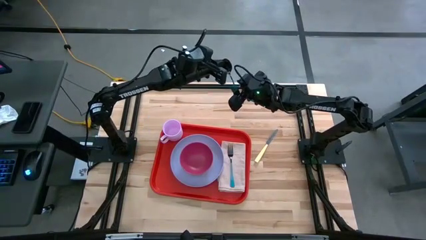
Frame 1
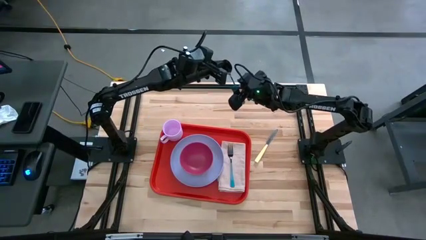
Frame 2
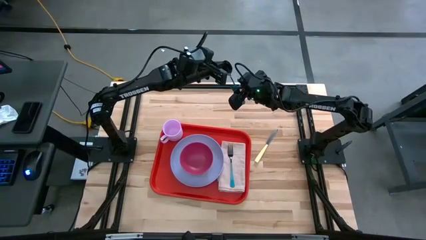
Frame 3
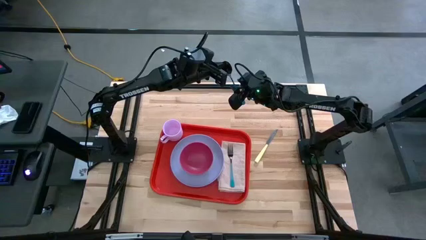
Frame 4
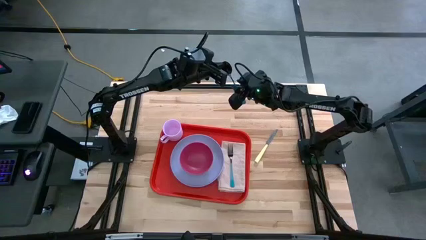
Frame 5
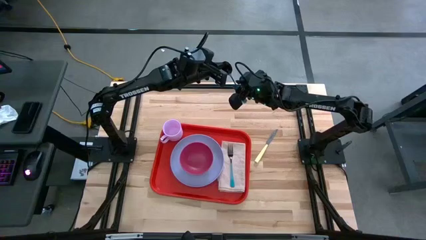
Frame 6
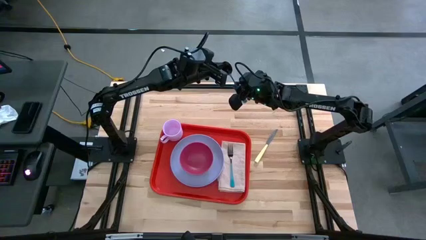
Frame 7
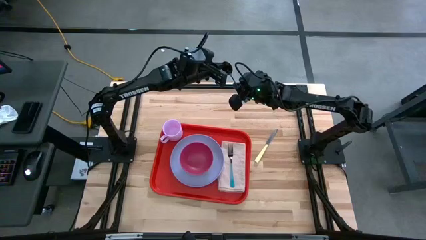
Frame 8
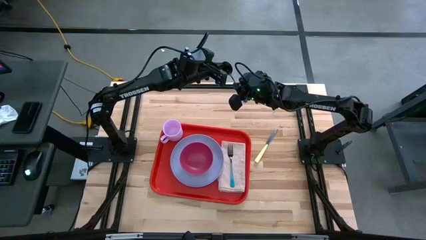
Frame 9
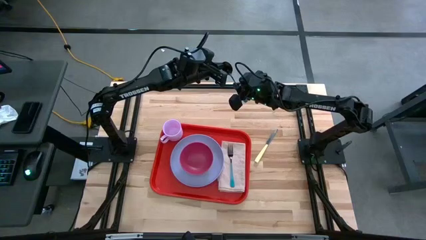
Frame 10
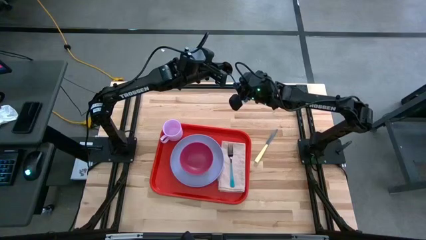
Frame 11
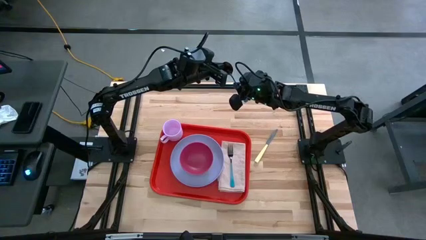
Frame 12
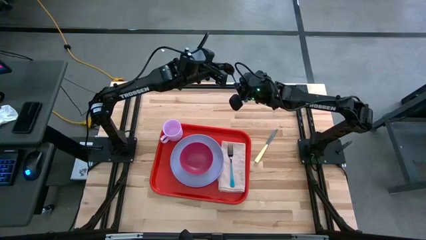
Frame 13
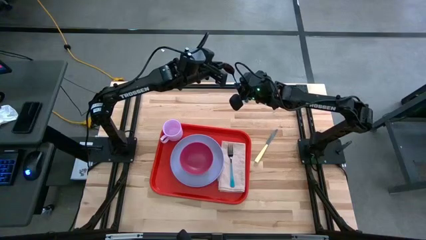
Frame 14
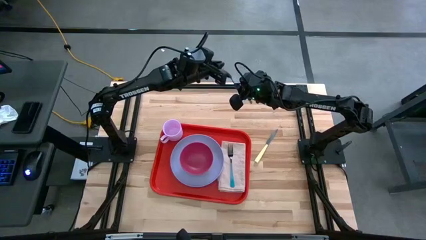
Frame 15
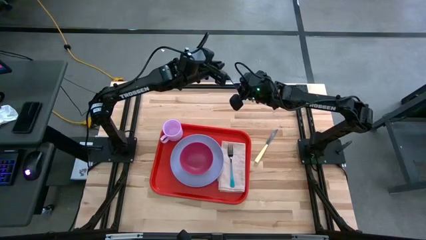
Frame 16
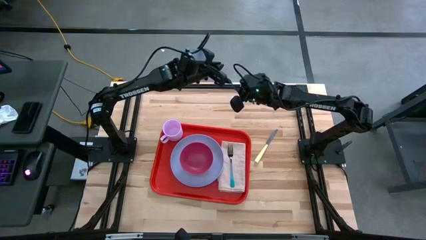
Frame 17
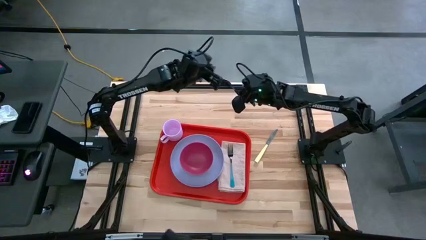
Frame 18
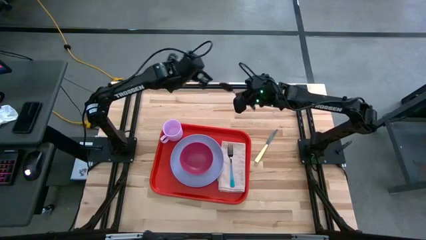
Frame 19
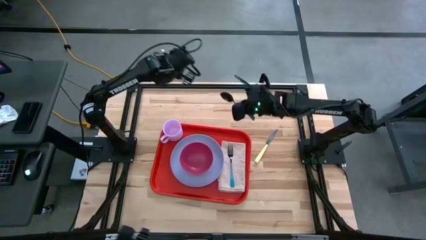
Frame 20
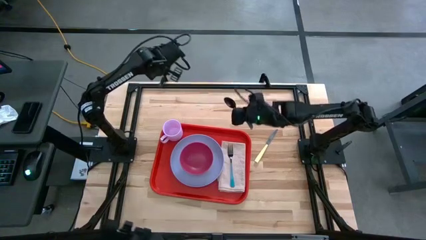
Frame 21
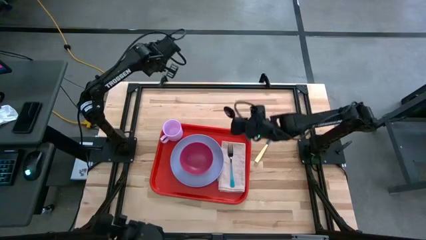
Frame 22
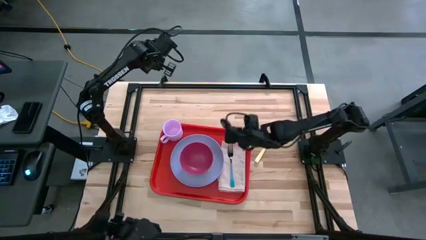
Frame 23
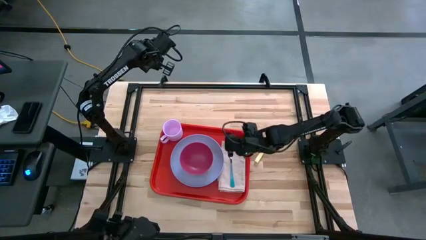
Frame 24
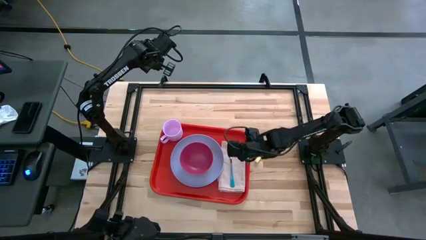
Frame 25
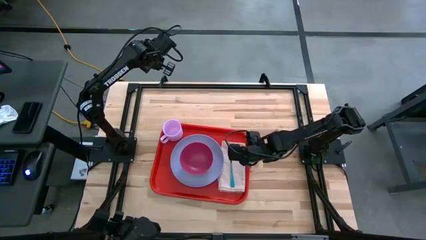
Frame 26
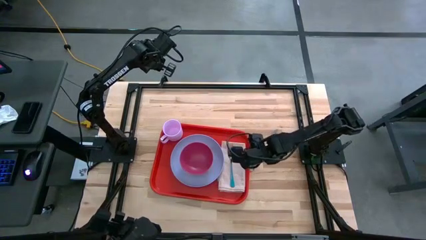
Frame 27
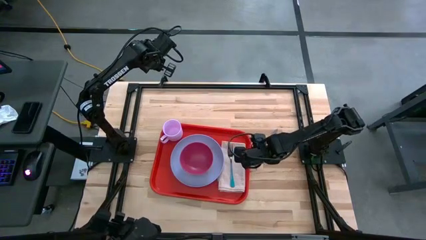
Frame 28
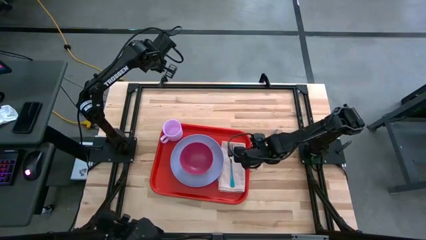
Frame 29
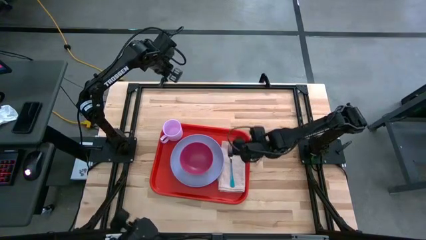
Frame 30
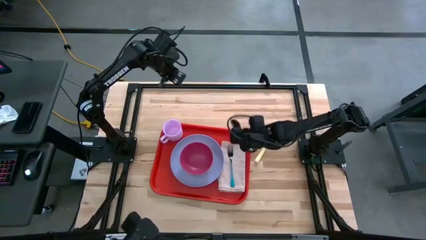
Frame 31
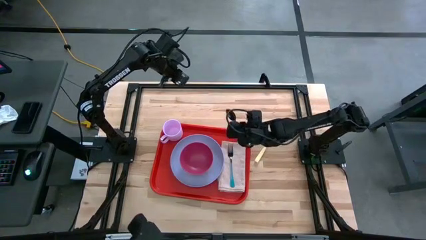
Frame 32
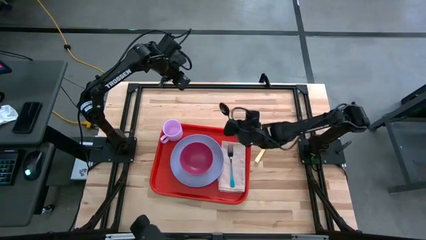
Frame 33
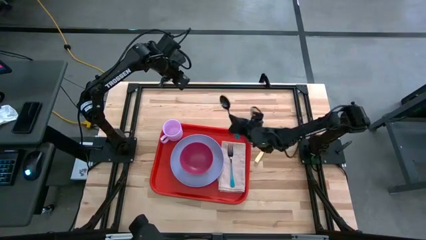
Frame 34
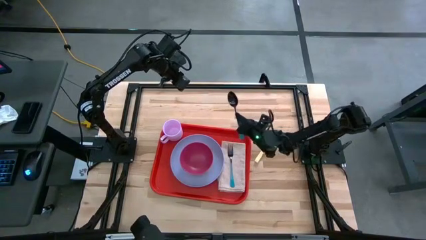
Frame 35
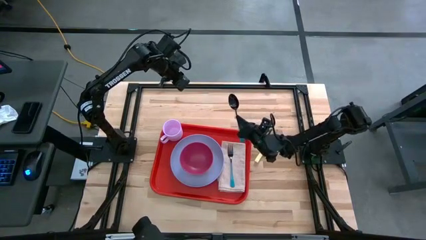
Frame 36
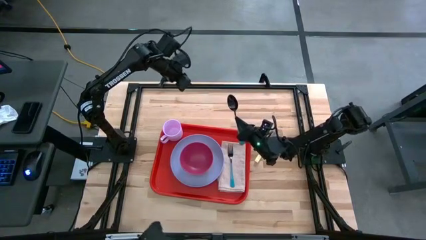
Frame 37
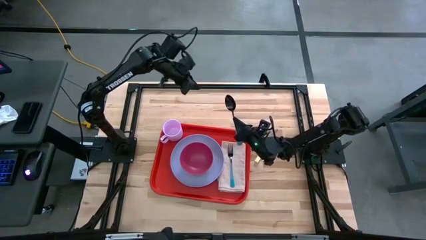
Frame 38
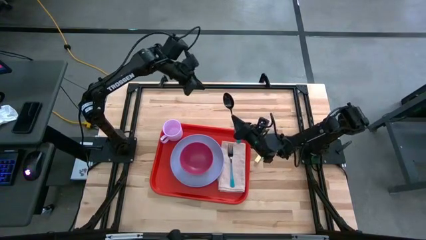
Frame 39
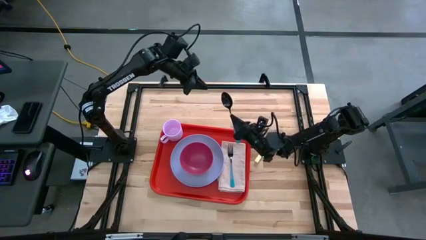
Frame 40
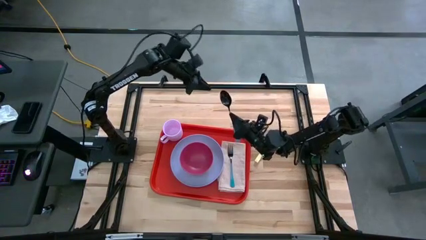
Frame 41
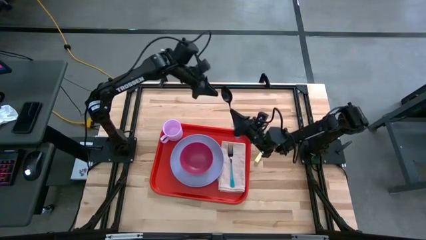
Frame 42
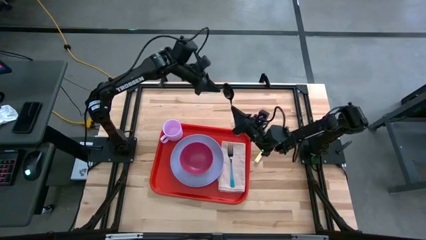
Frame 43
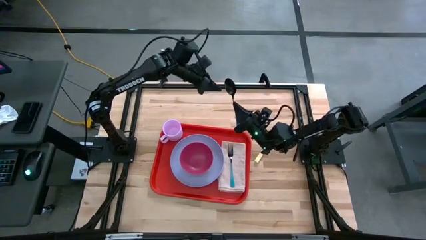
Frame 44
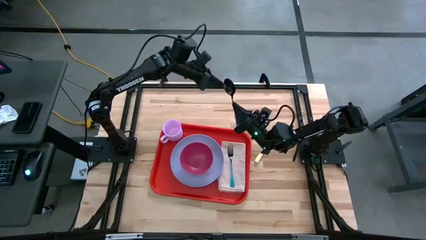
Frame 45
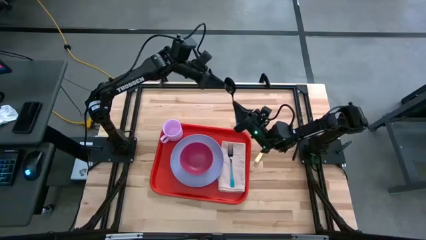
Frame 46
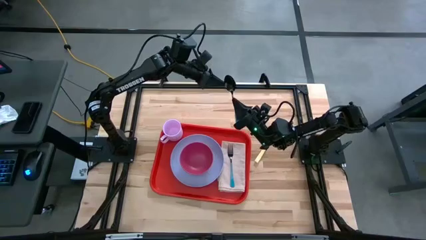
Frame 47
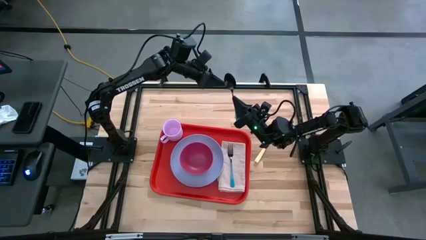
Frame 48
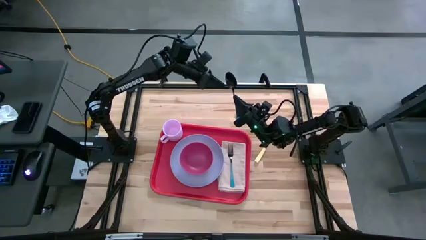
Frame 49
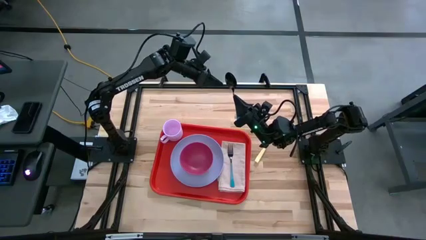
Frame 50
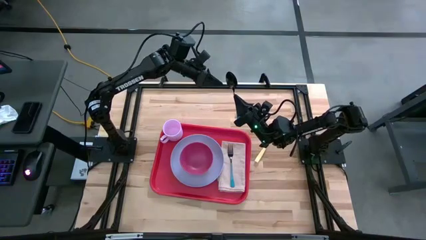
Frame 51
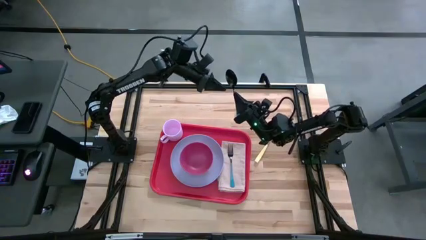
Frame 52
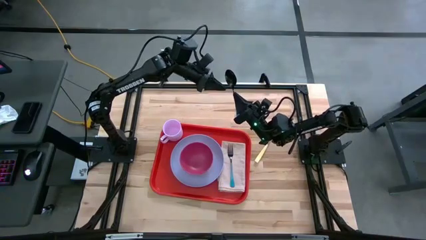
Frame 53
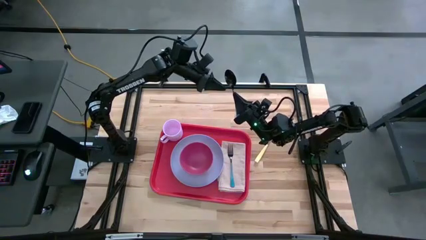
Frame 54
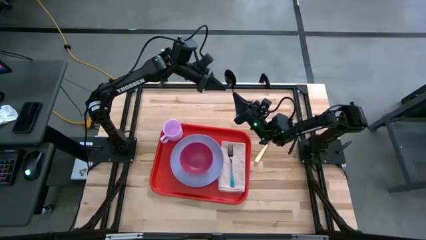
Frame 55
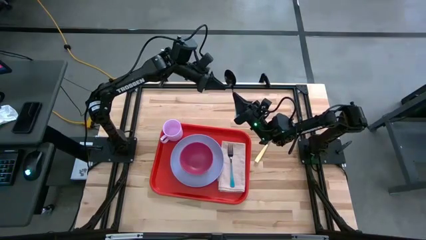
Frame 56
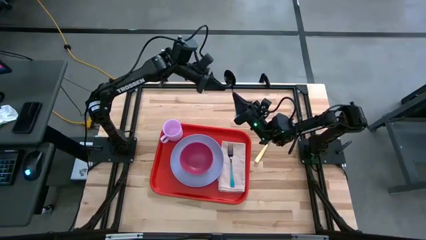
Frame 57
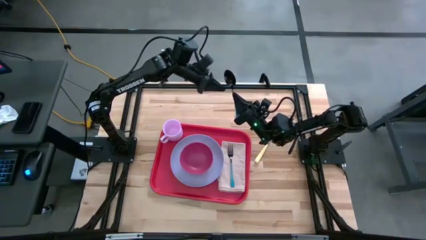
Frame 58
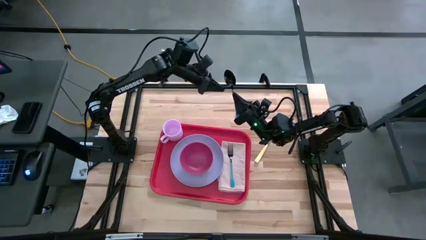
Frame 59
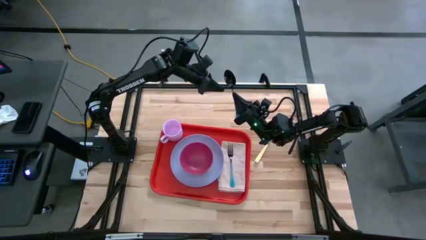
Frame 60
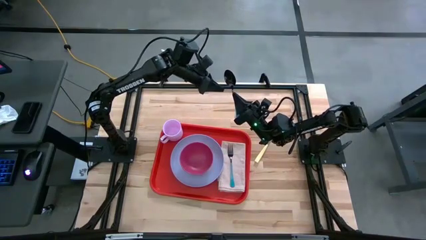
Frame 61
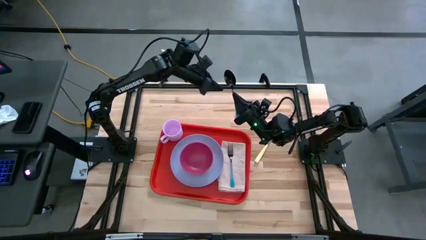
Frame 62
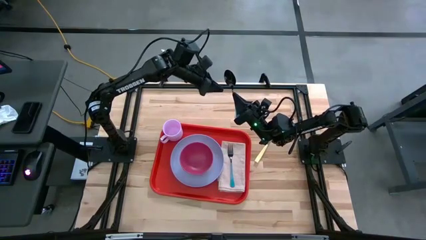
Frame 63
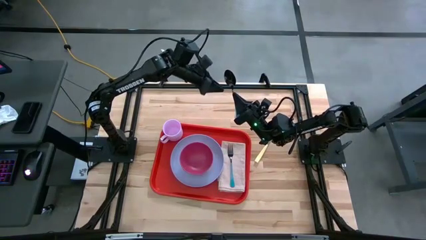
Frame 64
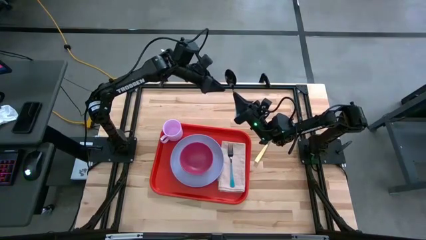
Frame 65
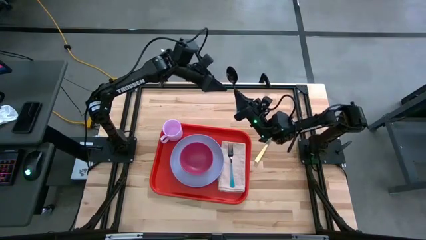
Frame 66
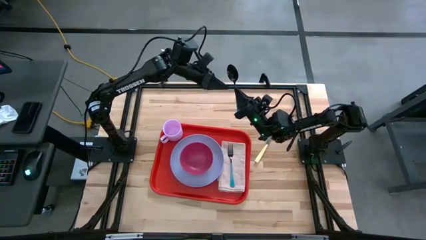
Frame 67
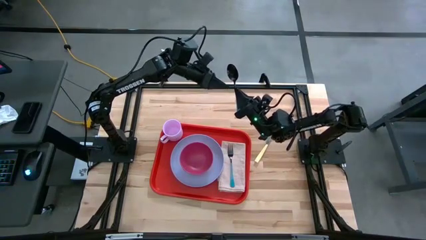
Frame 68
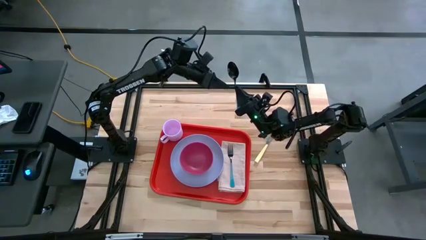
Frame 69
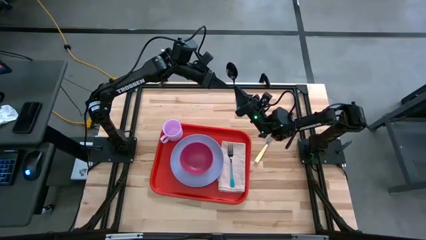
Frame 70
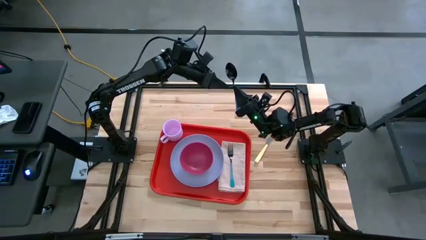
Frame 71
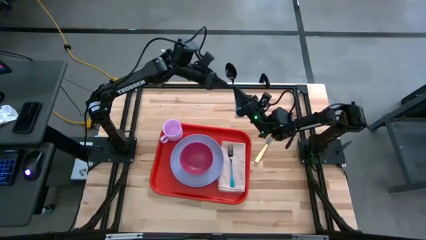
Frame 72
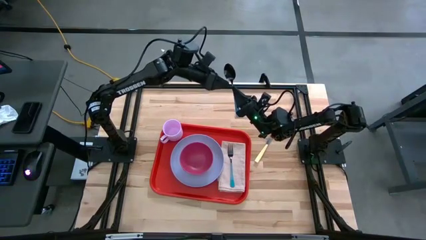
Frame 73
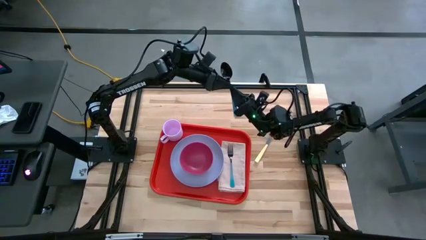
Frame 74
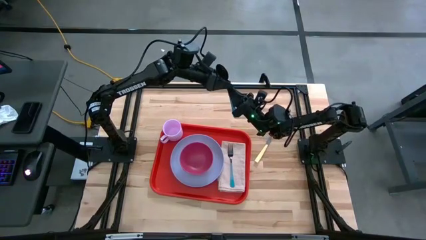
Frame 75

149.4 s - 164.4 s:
Task: Set up tray
Put the blue spoon on top of the gray napkin to the left of the blue fork

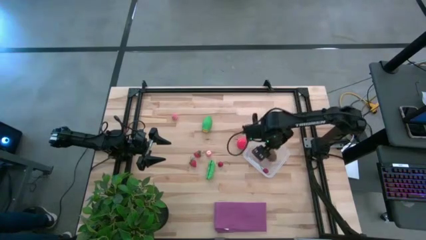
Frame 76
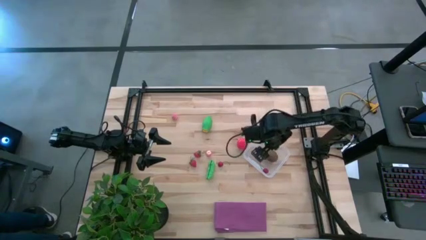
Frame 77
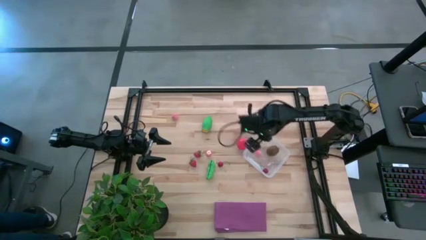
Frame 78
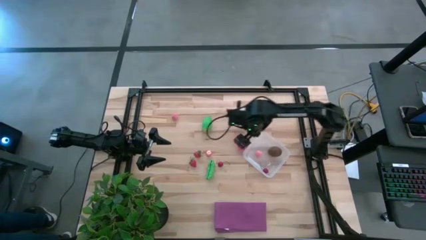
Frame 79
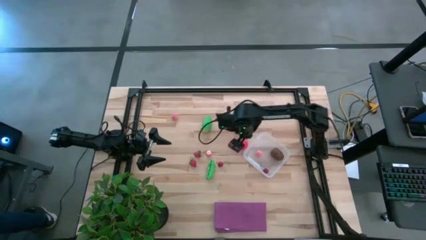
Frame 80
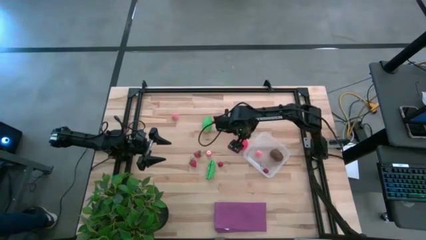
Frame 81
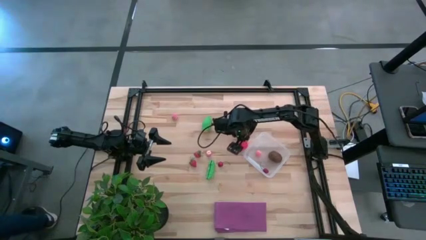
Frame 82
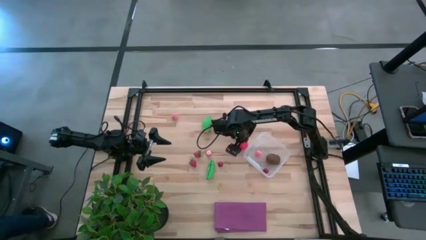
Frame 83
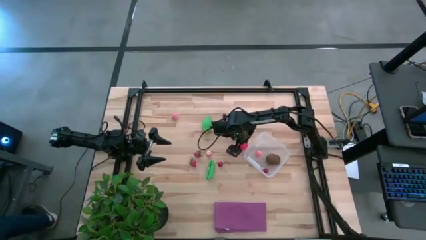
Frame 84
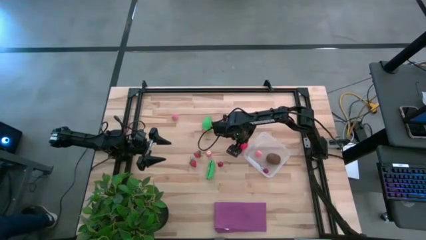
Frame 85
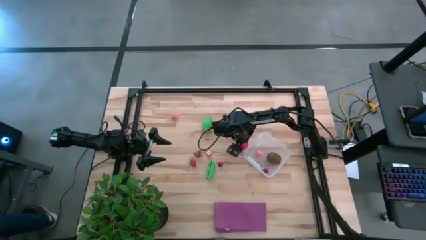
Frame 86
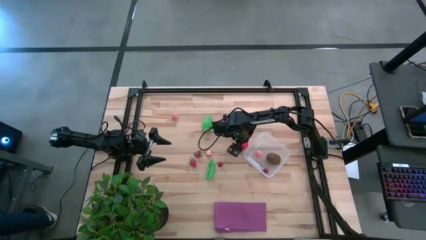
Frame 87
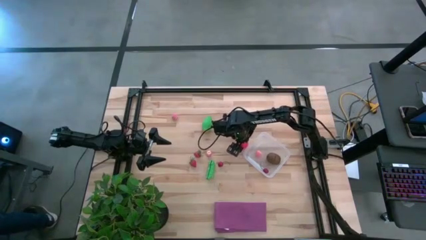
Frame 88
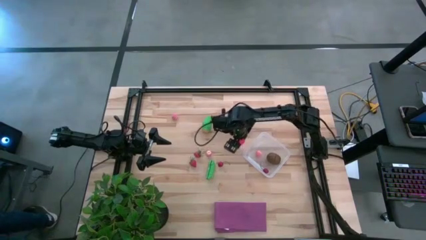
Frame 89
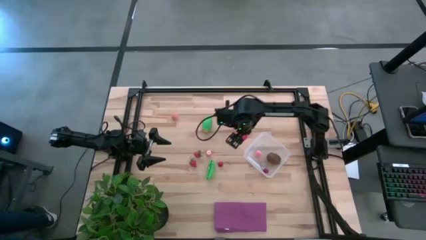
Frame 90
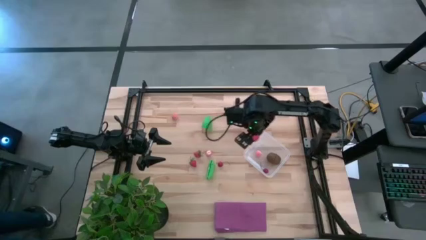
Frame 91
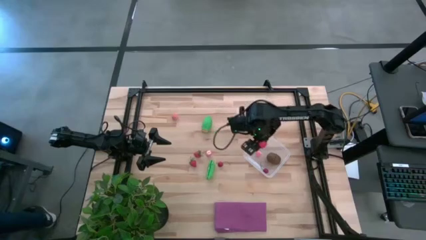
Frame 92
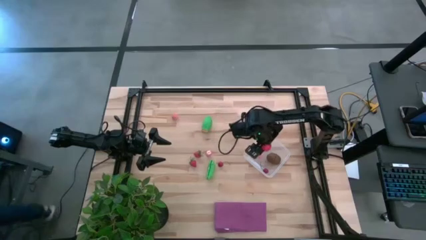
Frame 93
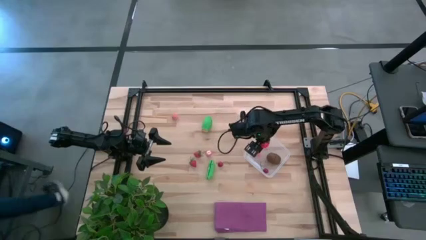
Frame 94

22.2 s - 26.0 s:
Task: Pick and placing Produce into tupperware
Put the red tomato into the transparent bin
